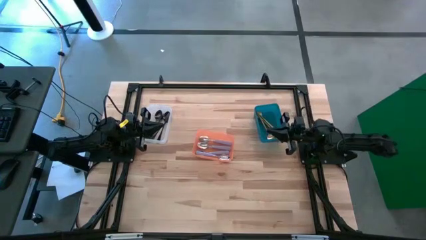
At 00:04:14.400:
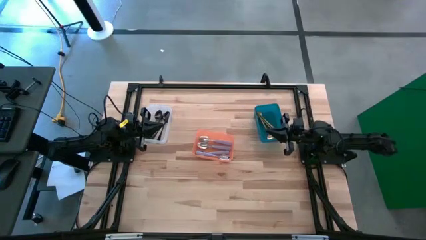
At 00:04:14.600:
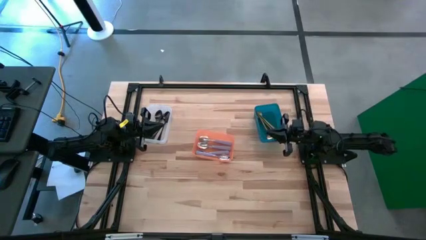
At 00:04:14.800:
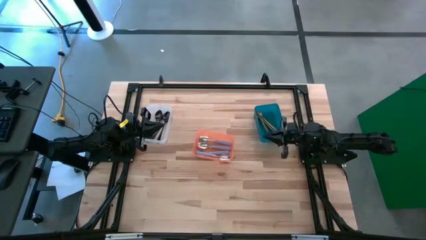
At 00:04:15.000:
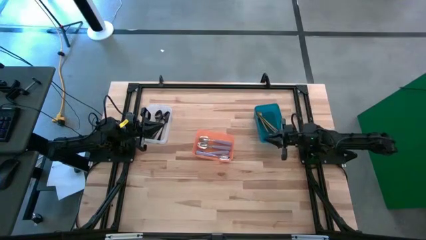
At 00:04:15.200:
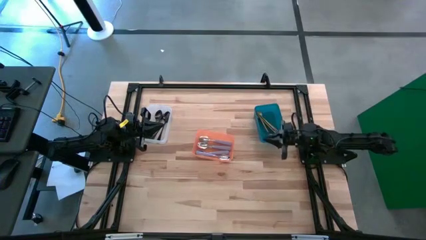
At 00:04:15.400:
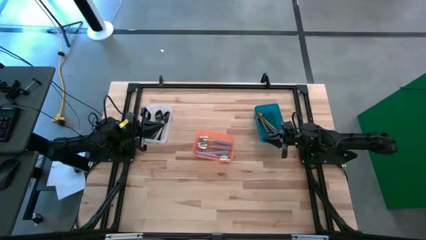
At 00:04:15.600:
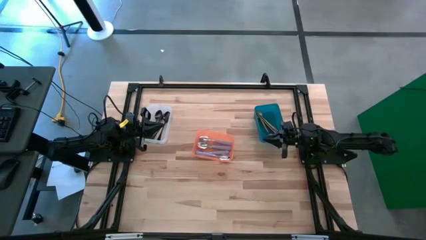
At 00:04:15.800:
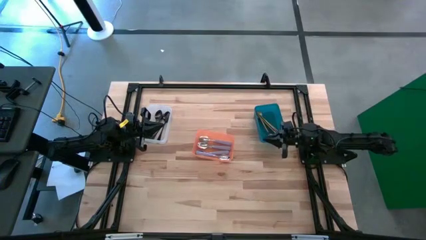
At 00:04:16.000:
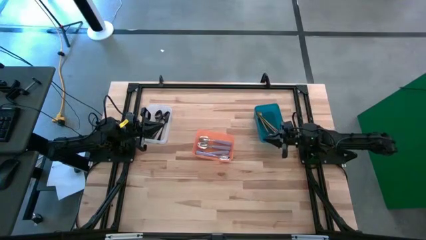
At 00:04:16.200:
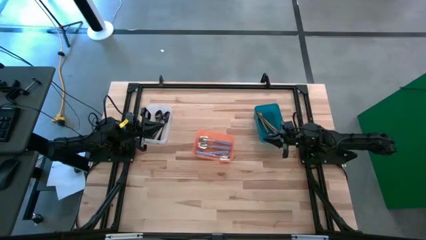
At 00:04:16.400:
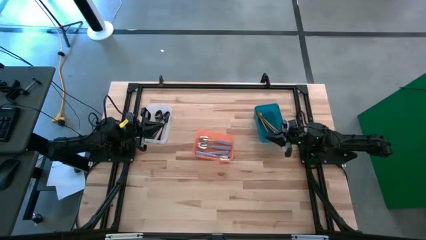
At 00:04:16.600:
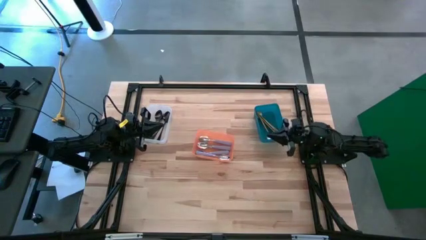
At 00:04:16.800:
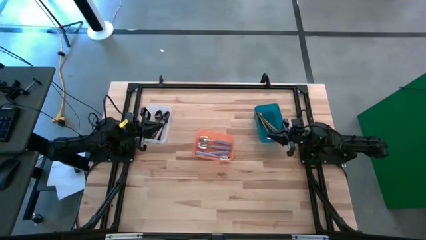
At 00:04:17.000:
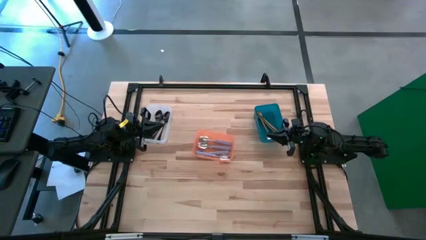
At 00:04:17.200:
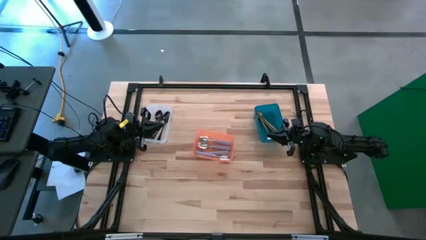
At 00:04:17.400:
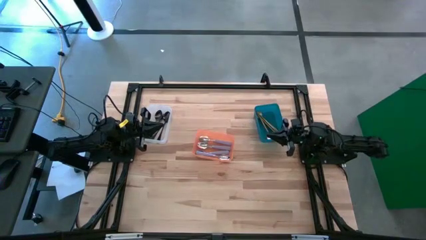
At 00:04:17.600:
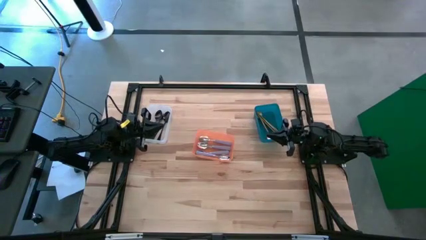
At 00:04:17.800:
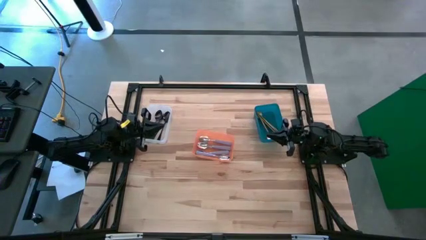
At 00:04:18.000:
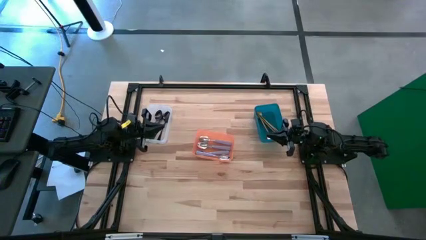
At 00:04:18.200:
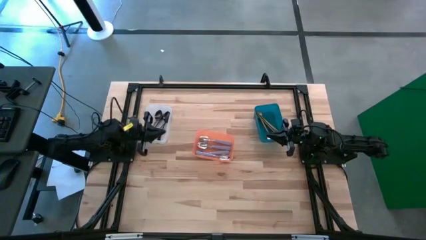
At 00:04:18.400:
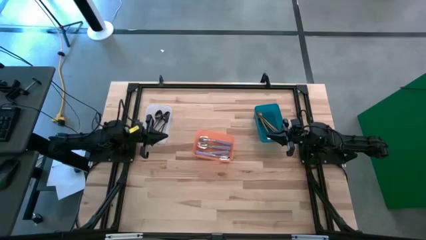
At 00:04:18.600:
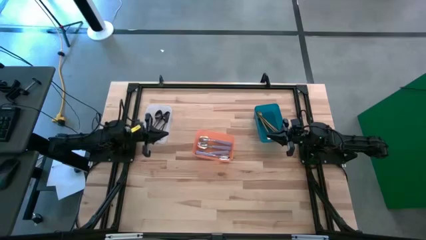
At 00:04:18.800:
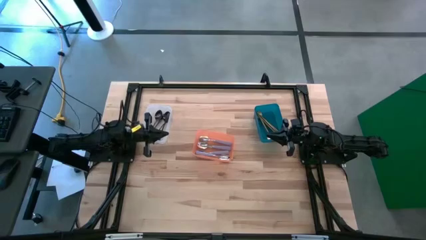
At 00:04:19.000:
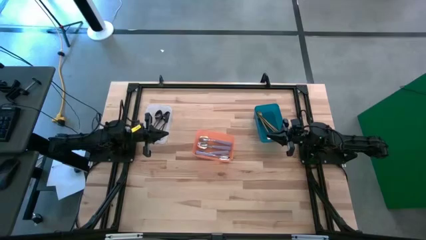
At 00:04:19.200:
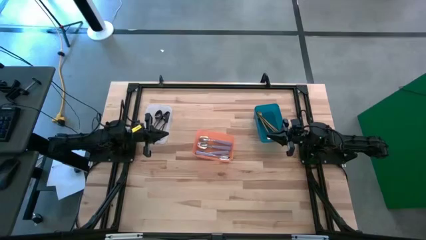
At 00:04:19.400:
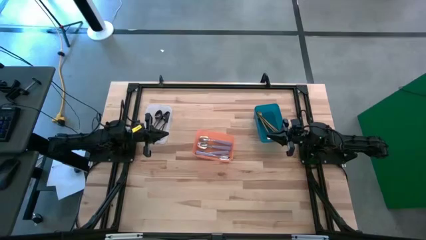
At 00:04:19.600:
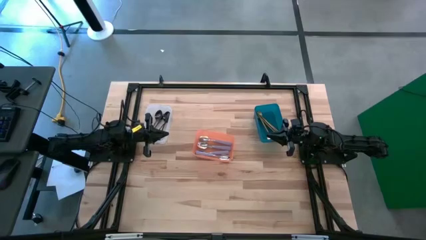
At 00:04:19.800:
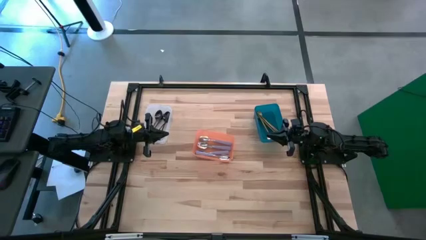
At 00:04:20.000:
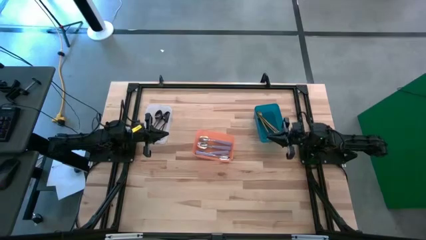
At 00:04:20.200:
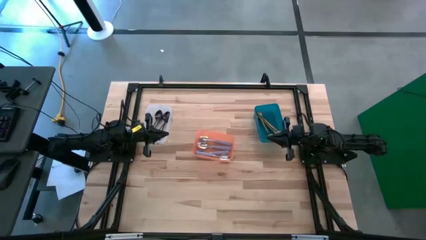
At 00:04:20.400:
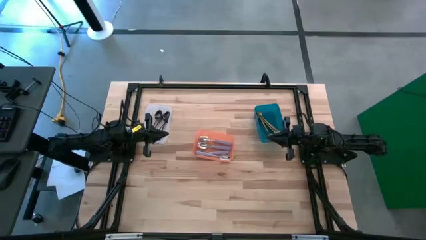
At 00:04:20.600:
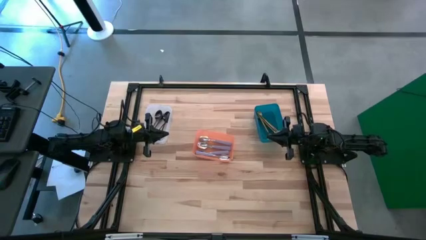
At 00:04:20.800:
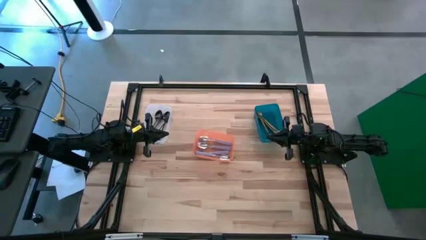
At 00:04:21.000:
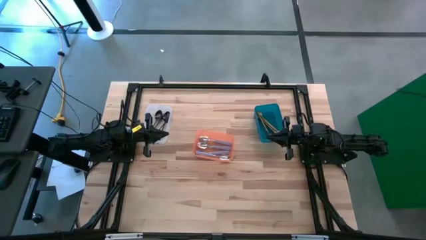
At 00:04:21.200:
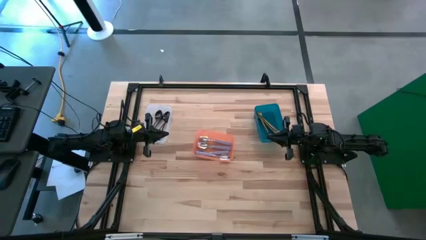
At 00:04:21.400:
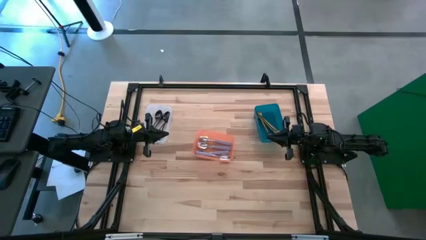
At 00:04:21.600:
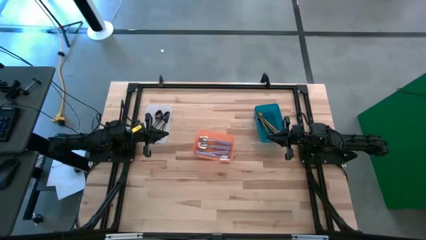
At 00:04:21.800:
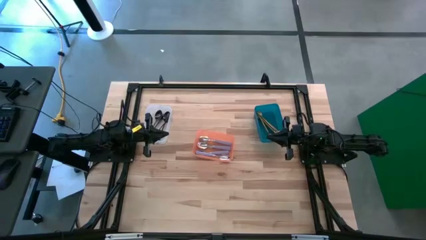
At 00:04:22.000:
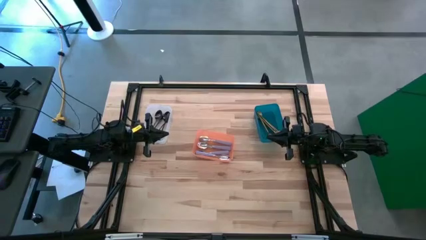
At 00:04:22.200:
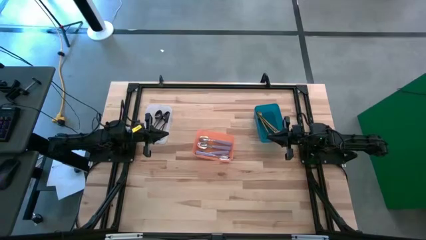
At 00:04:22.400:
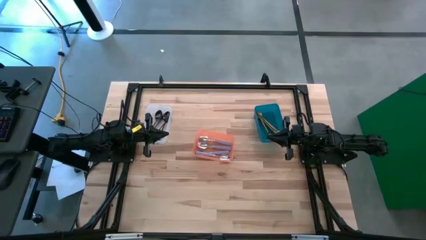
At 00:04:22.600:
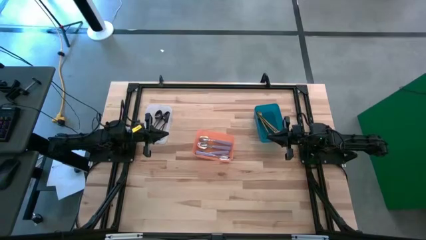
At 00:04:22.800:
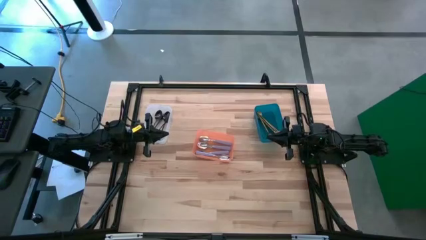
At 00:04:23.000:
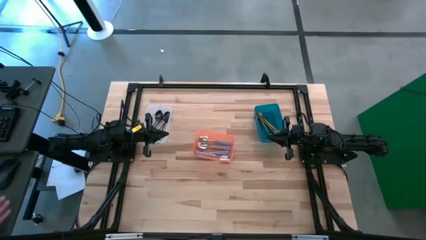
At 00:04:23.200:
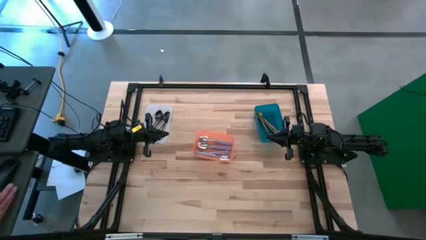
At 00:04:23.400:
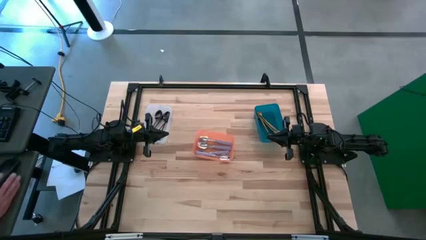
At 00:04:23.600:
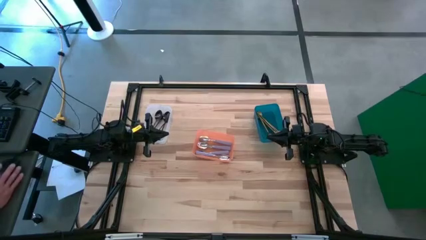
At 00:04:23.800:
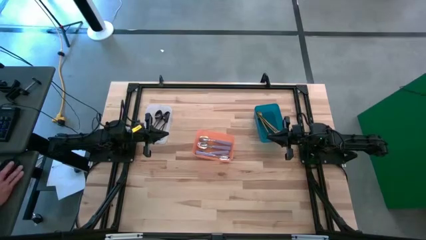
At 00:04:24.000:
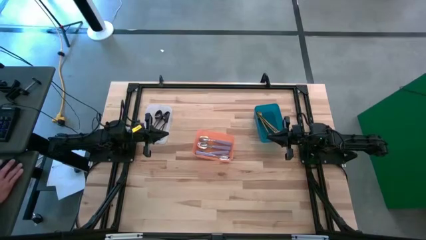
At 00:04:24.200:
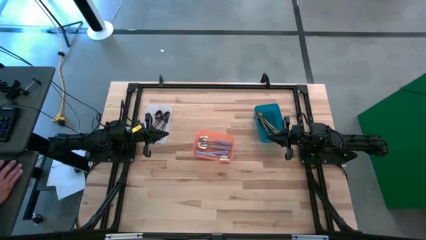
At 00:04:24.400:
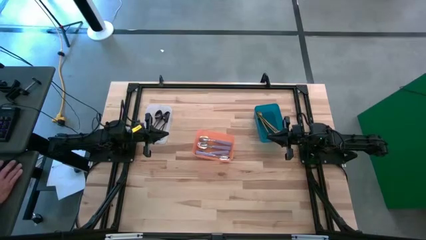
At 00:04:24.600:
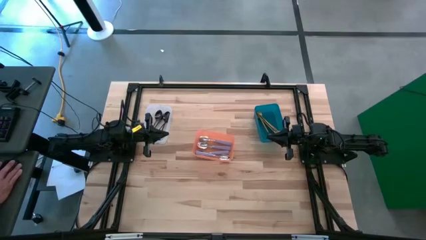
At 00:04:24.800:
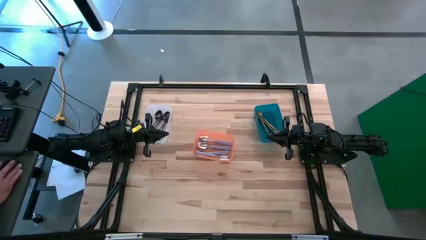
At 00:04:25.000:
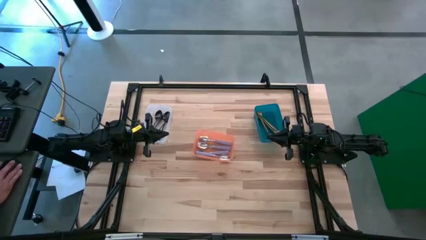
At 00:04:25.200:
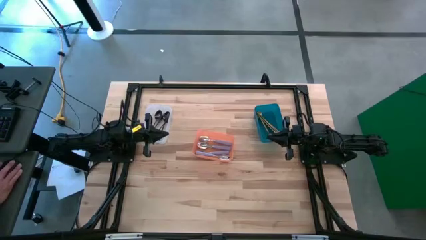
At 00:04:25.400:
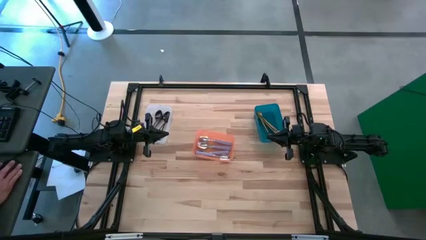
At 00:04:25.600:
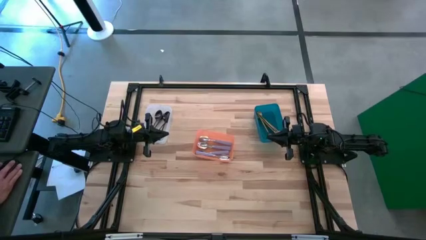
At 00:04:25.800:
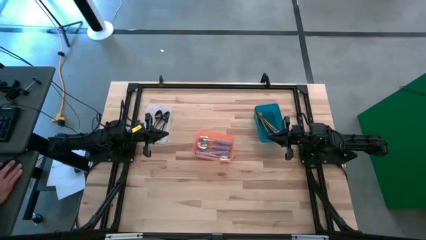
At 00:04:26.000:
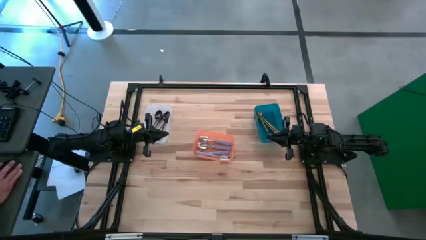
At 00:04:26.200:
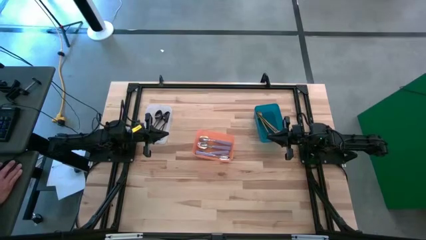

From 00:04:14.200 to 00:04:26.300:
Task: Sort silverware by color (type)
Return to Home Position

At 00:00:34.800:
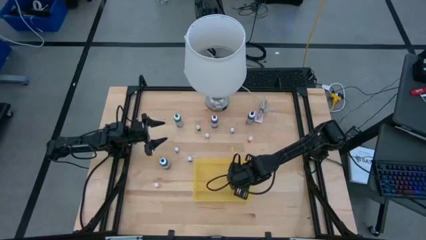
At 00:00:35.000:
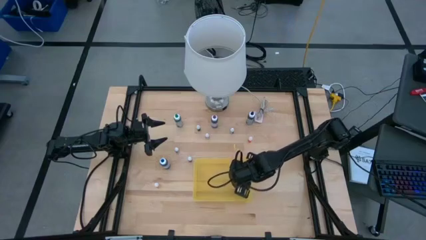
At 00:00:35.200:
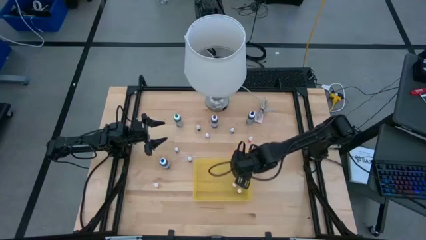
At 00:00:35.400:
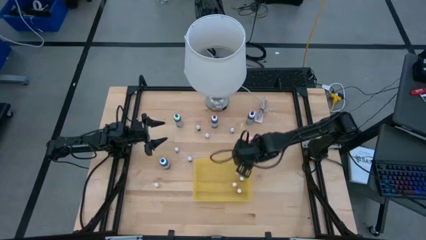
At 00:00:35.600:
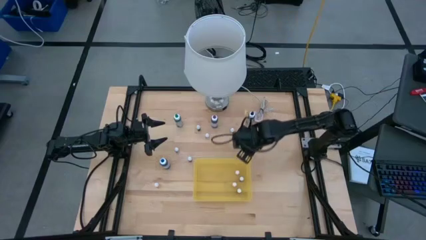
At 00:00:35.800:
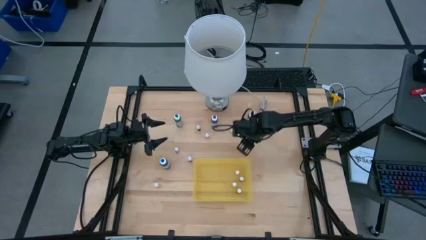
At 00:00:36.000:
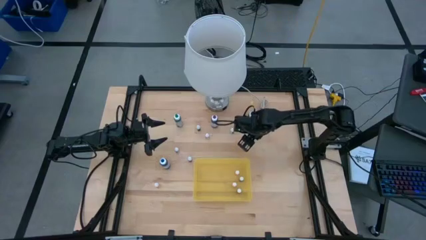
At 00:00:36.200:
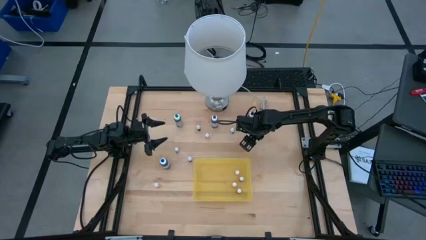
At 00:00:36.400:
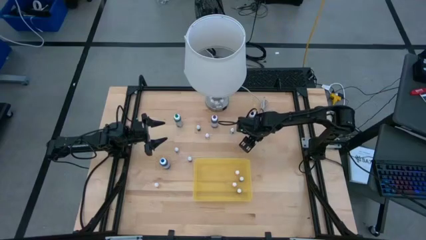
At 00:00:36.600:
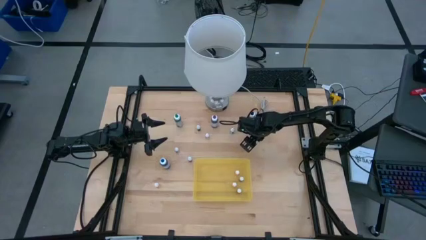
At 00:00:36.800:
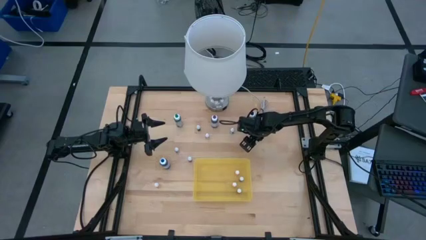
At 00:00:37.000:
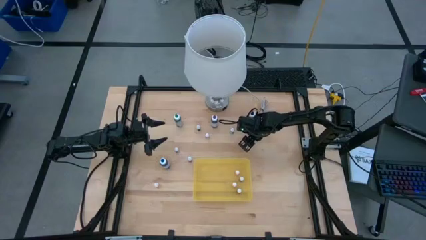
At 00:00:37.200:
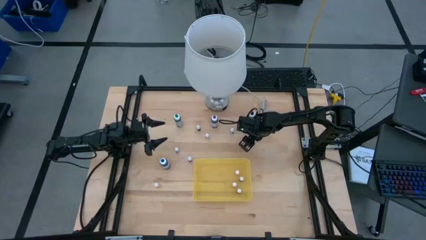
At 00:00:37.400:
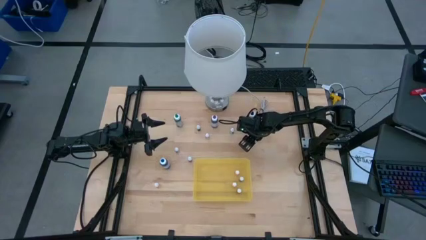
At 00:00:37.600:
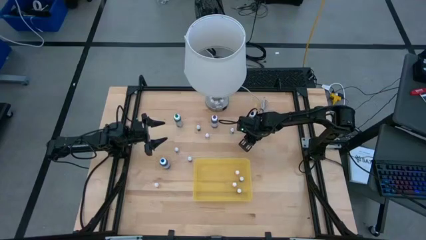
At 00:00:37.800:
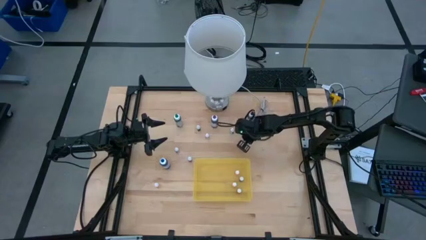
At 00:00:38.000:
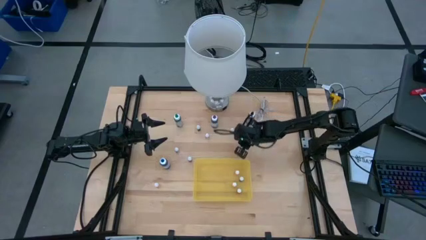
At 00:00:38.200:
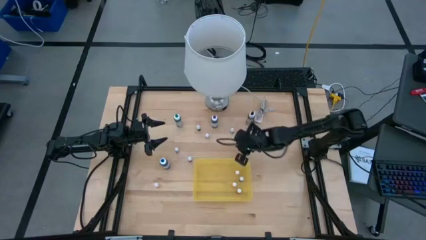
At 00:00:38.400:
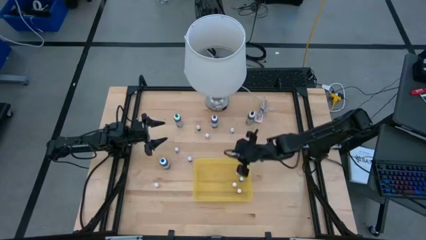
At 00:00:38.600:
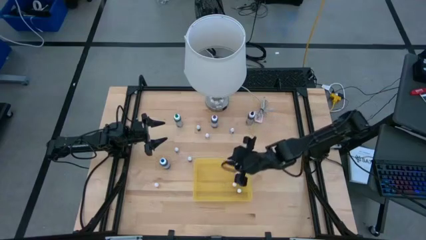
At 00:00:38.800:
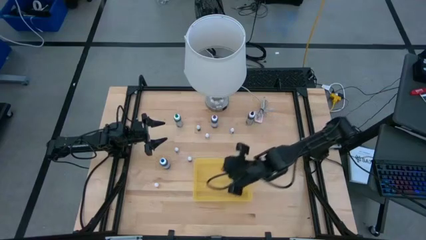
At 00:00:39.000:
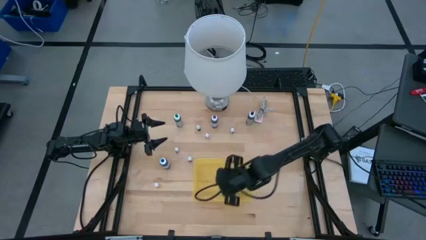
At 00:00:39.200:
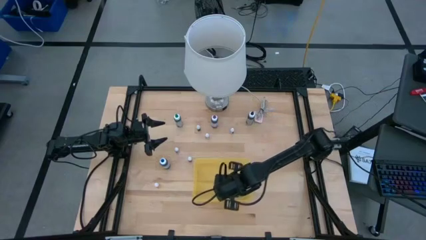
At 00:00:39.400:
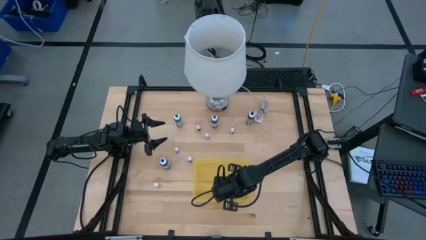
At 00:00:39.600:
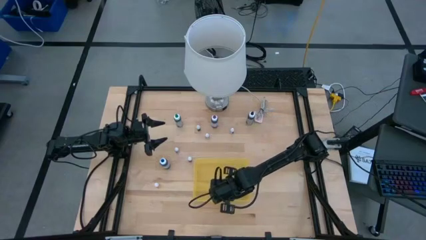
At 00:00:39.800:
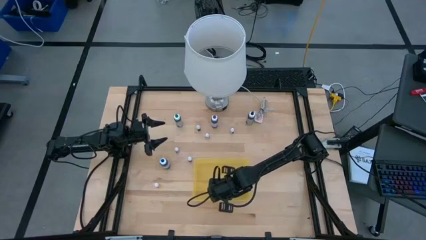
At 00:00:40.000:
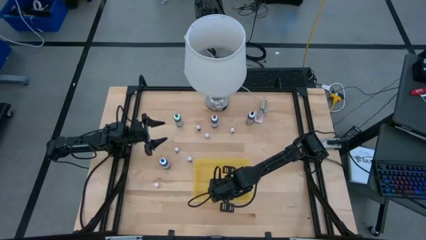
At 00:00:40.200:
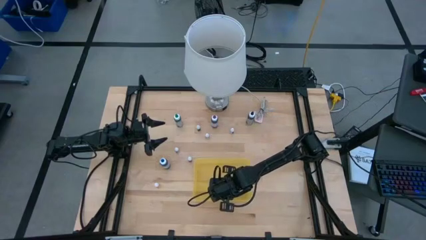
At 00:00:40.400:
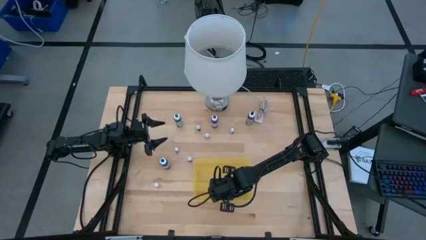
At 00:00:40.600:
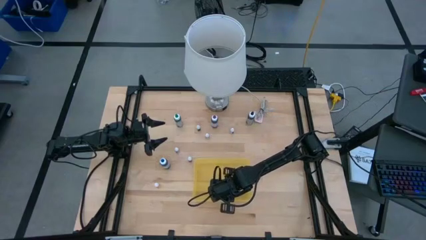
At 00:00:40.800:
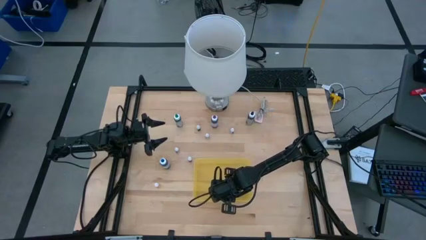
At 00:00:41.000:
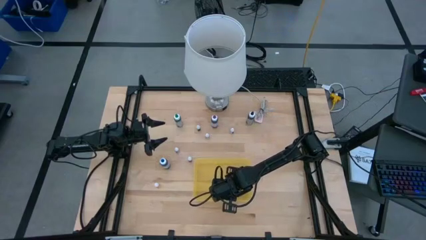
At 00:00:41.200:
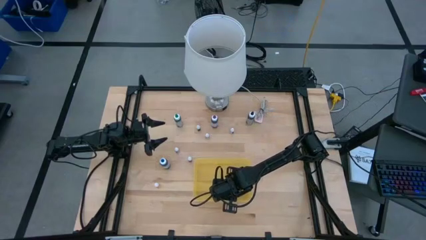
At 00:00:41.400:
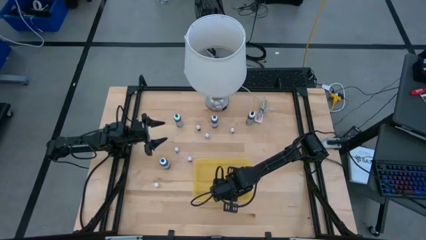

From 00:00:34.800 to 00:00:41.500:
Task: Pick & Place food coloring
Put the right small orange food coloring bottle into the transparent bin
